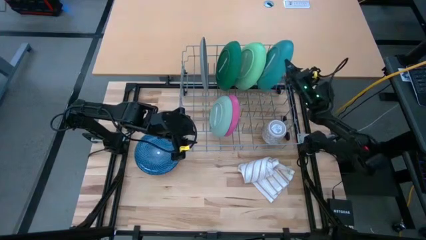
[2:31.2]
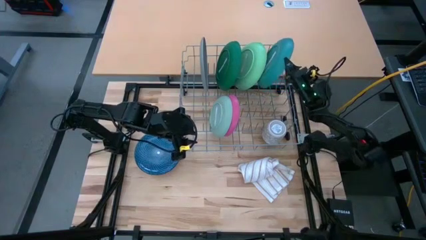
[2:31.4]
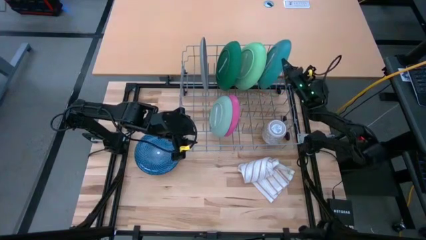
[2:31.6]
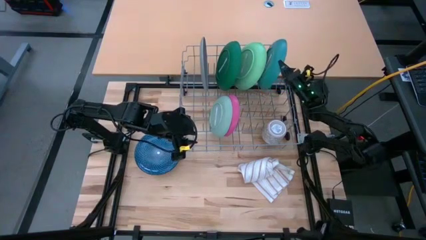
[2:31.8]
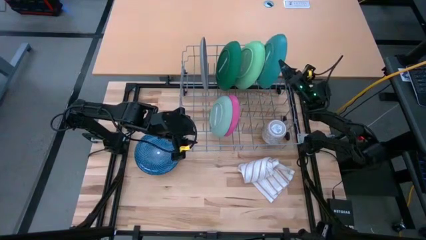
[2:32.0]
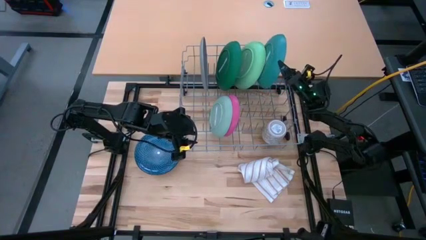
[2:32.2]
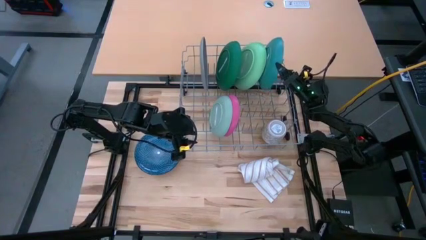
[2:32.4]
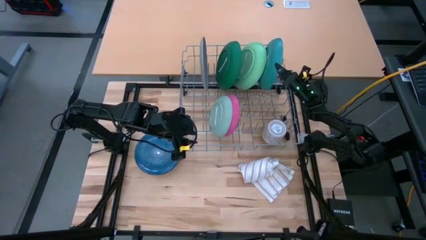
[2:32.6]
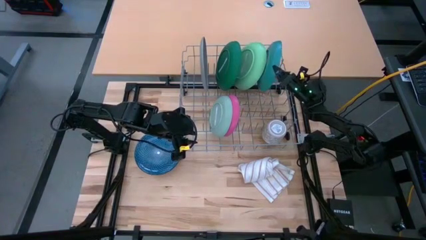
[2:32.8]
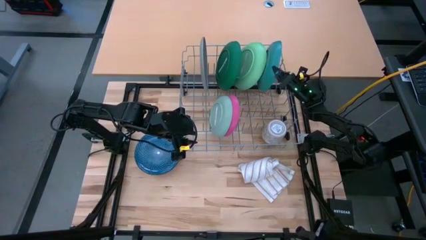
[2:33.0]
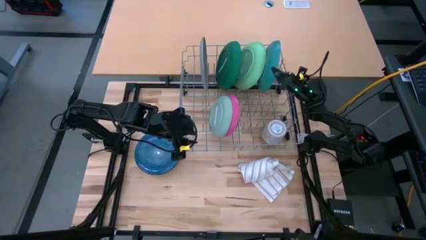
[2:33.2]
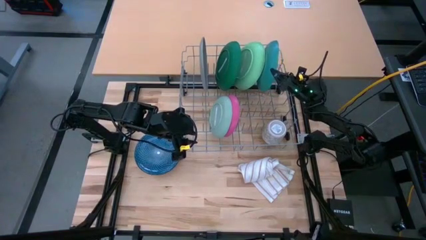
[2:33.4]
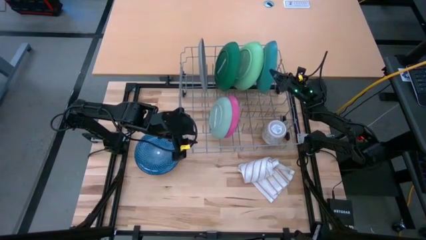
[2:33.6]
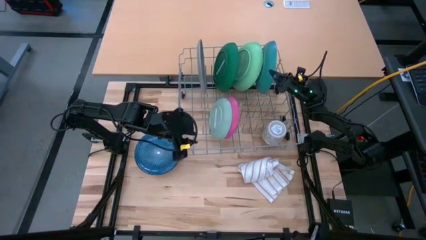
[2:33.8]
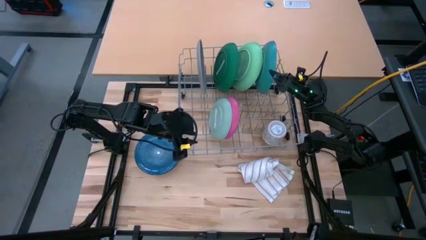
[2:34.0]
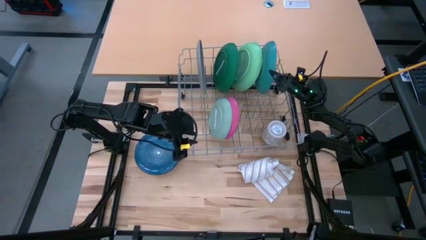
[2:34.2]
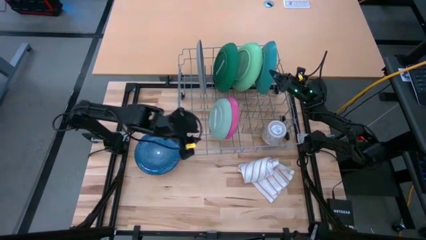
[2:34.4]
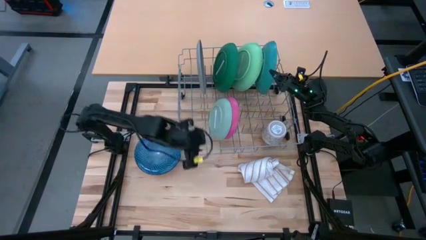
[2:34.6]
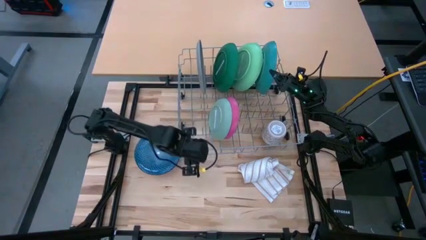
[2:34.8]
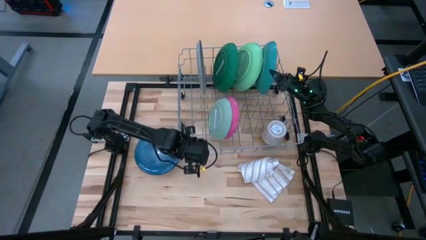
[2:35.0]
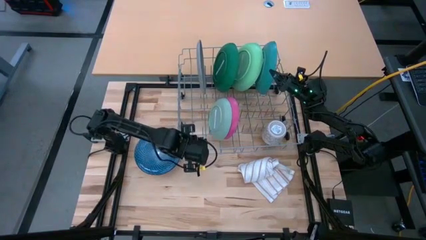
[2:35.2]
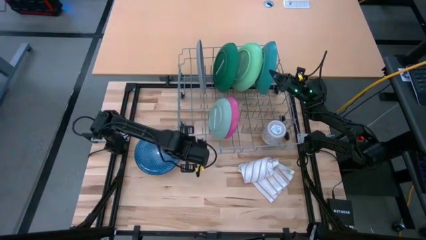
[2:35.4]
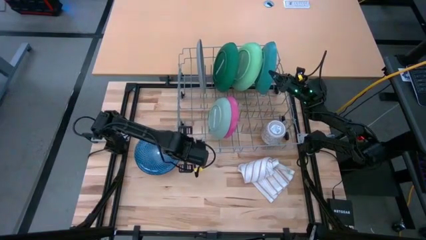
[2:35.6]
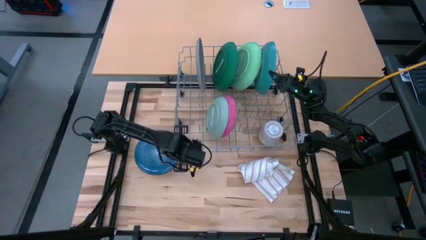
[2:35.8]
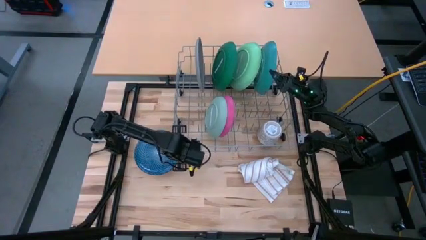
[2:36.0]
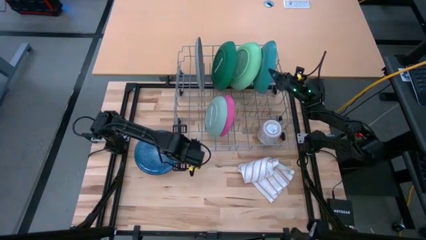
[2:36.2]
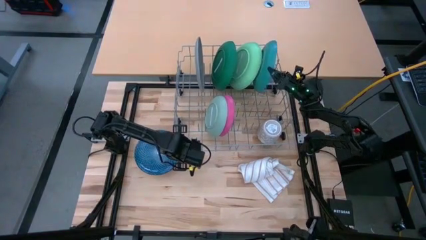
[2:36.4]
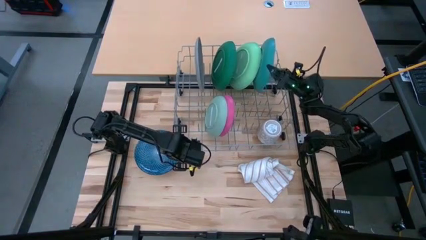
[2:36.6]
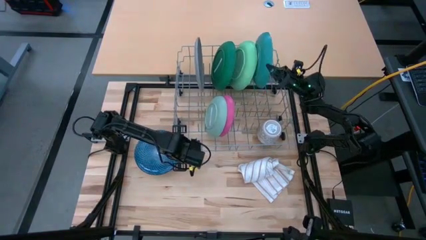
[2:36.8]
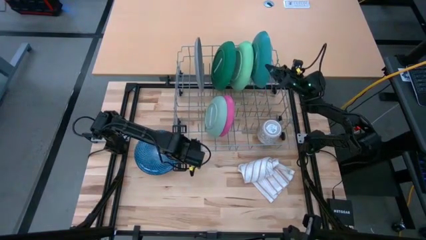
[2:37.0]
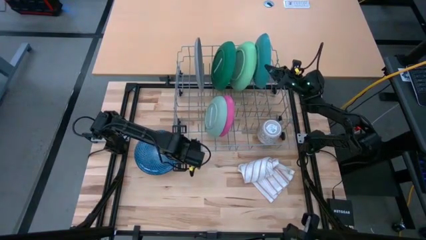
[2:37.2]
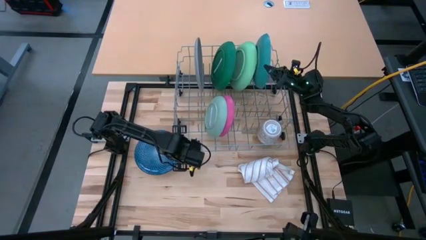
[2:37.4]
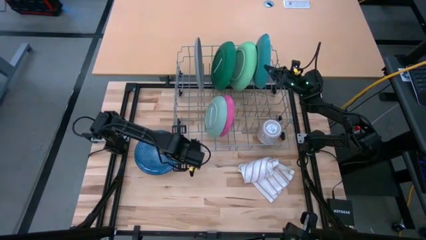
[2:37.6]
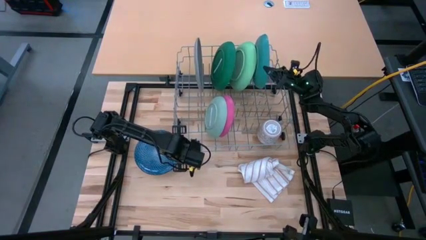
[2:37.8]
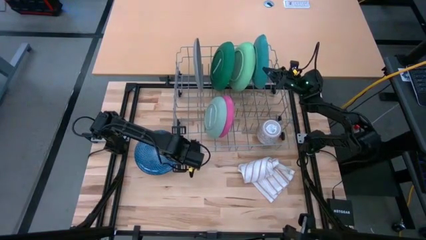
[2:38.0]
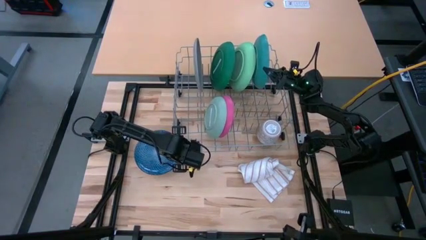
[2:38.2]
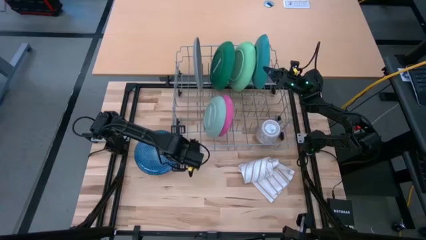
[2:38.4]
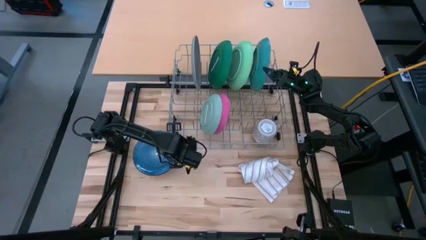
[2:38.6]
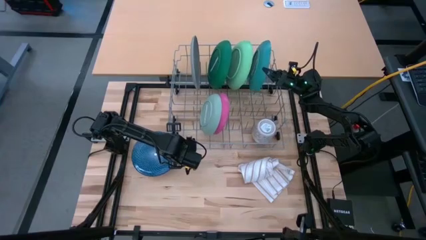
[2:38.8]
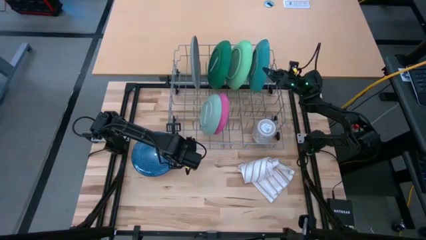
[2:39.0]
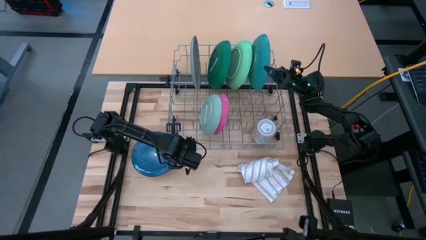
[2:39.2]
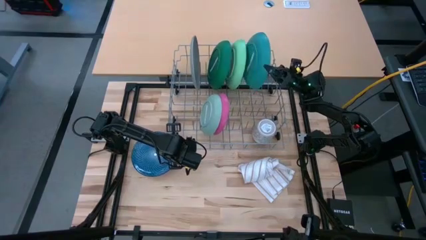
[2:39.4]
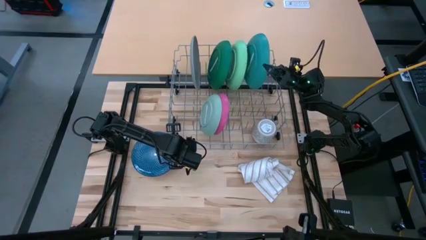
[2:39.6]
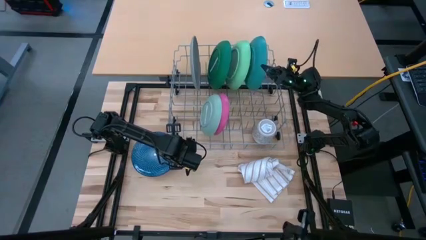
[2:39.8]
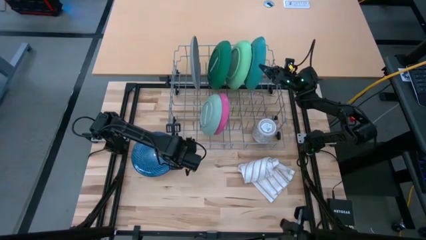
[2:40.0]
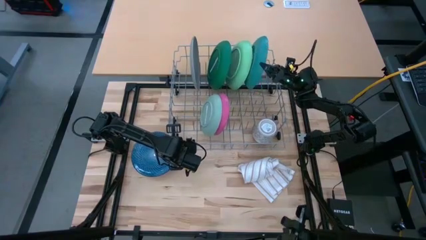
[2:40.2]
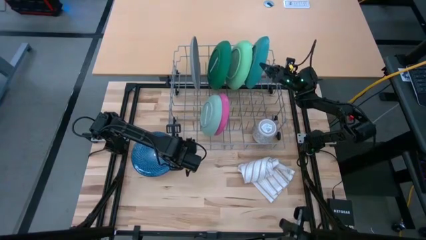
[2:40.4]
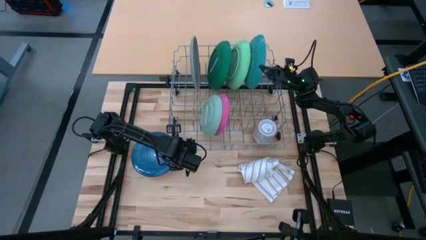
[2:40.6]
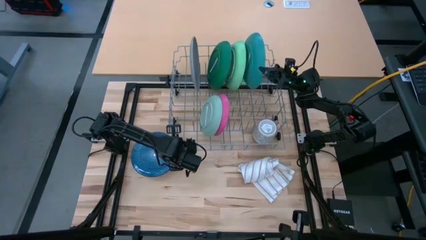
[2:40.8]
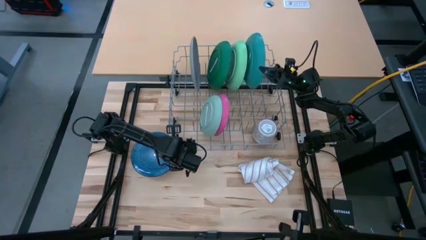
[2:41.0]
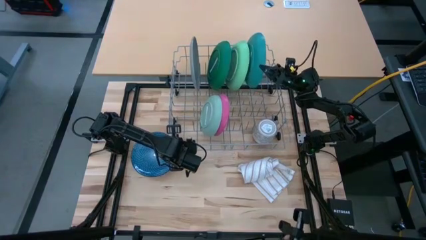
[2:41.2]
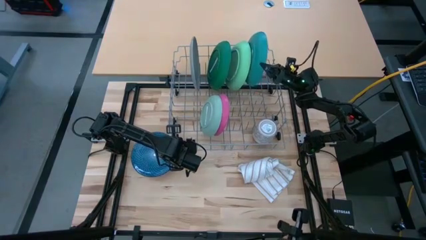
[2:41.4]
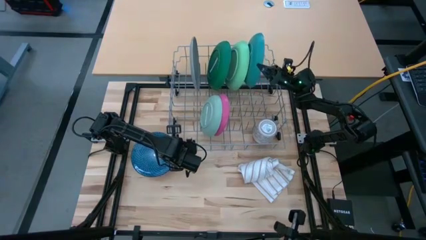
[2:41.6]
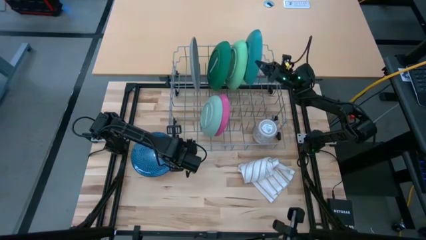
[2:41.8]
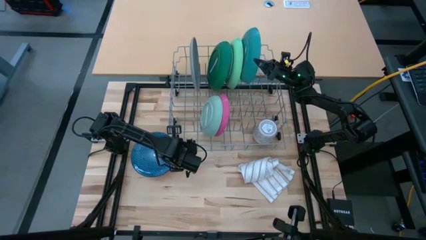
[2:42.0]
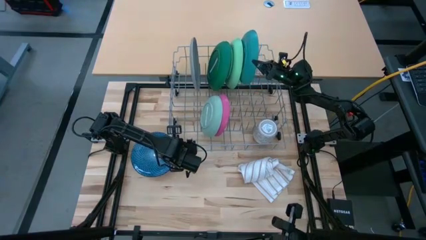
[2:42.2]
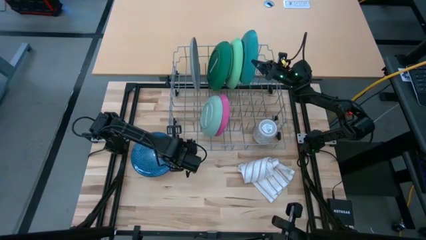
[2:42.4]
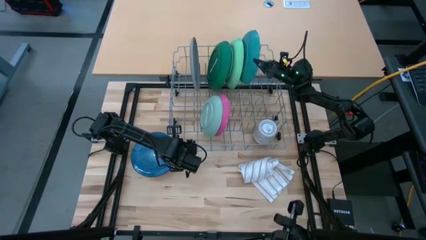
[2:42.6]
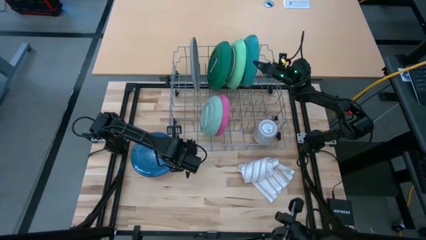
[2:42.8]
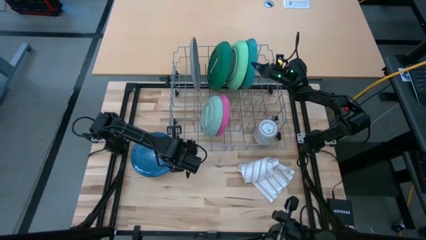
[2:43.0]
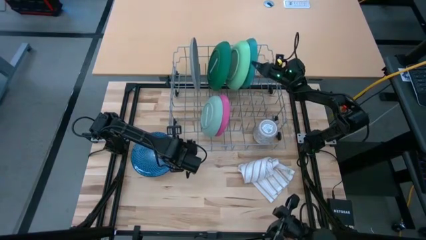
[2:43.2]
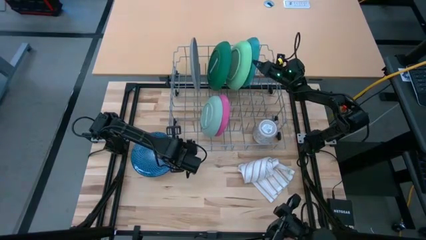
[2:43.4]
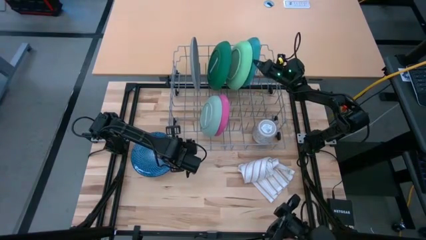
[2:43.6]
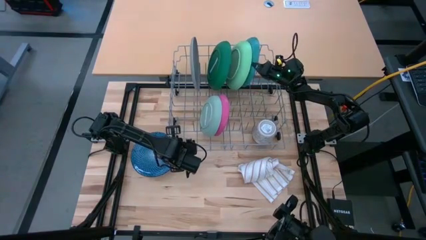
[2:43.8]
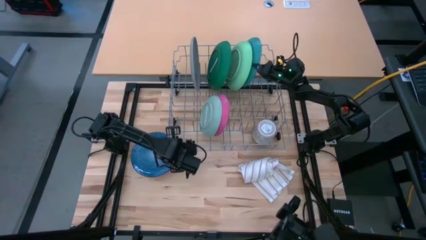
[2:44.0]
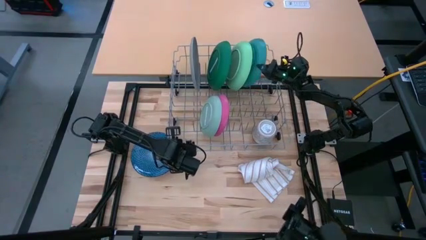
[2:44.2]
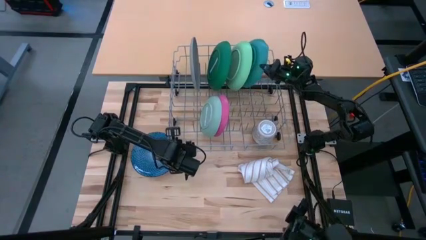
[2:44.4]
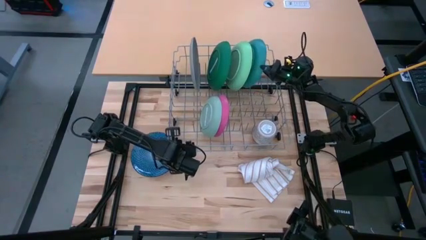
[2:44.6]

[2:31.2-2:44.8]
Task: Sort dishes
Put the blue plate in the dish rack
